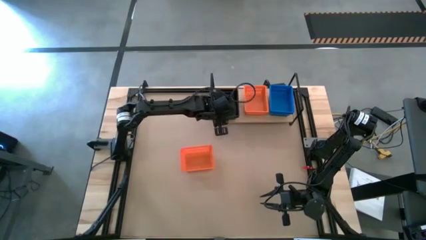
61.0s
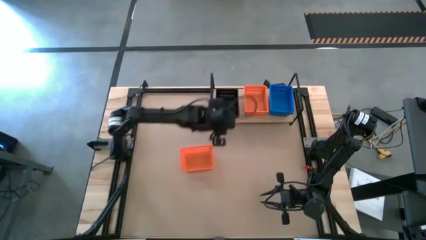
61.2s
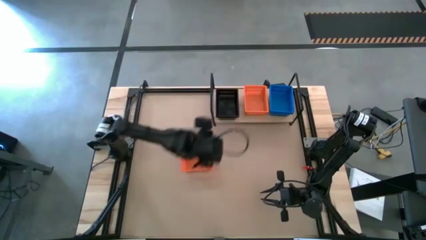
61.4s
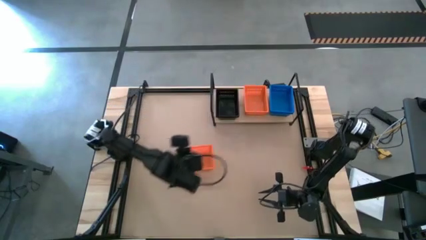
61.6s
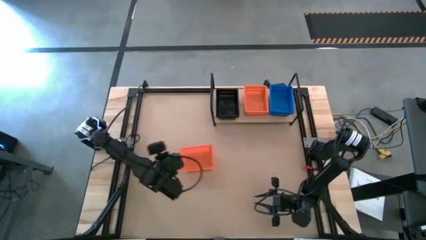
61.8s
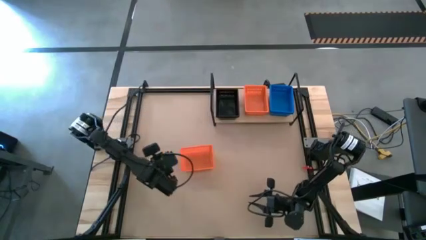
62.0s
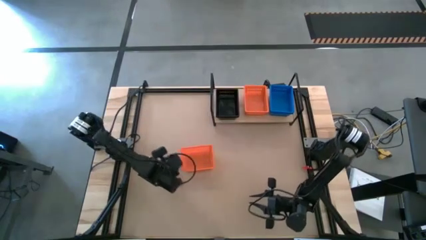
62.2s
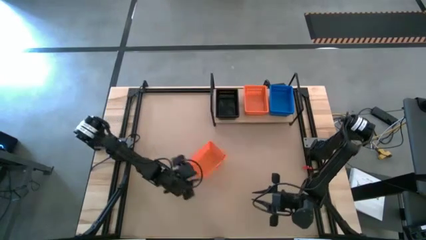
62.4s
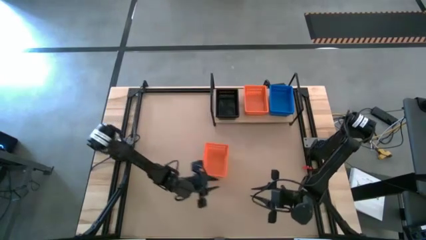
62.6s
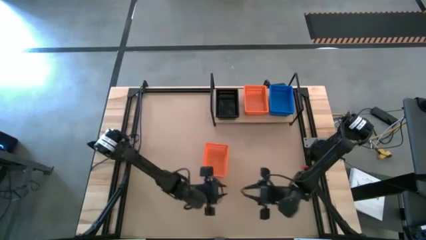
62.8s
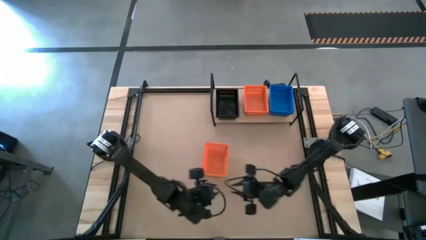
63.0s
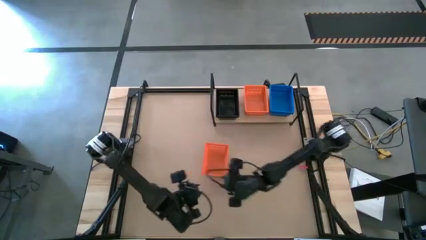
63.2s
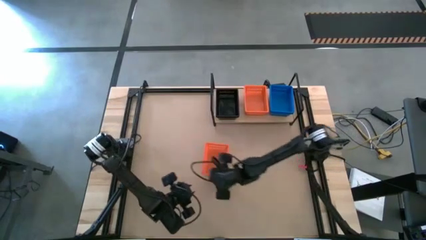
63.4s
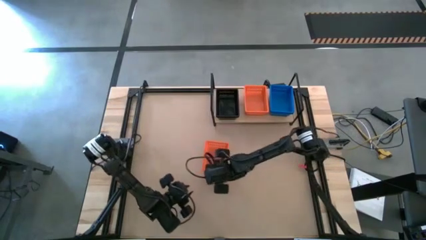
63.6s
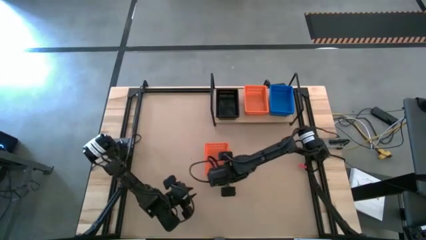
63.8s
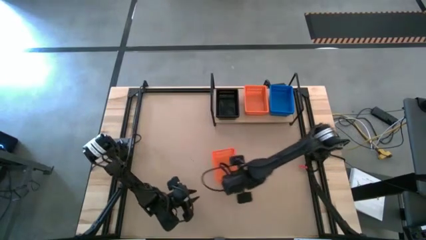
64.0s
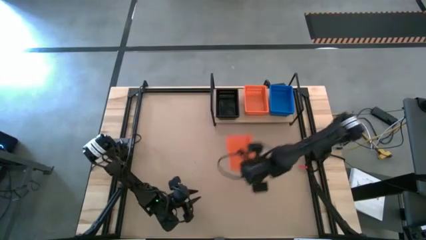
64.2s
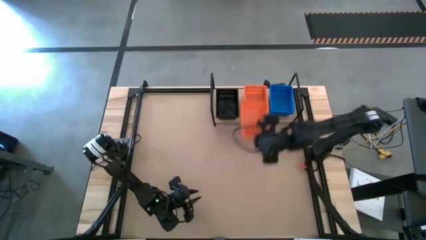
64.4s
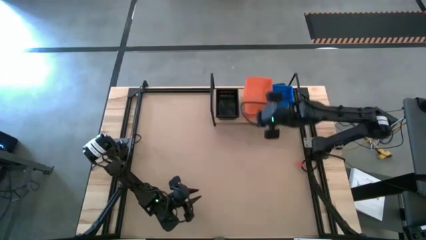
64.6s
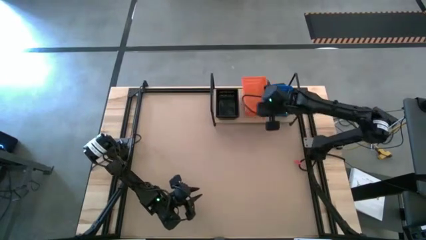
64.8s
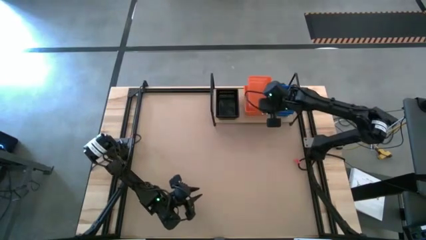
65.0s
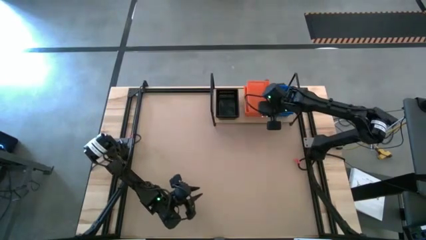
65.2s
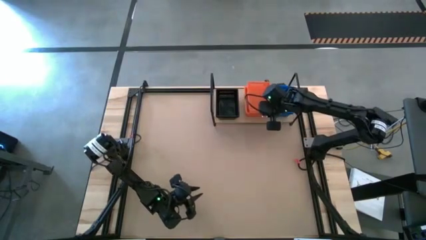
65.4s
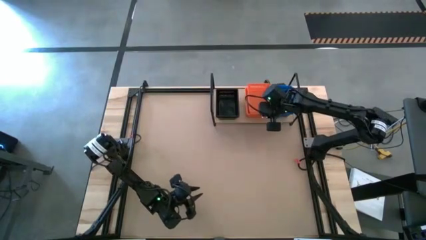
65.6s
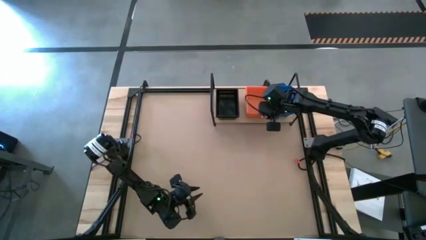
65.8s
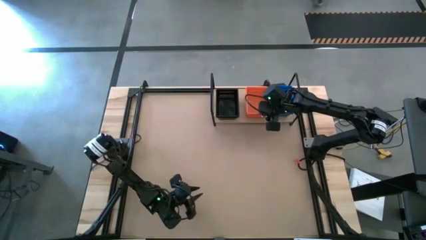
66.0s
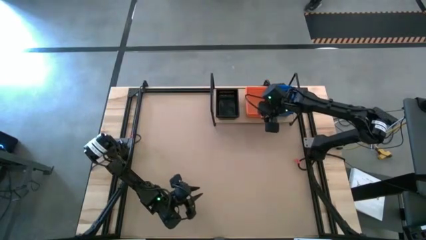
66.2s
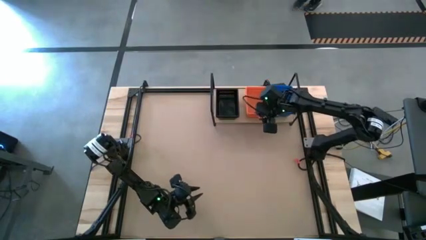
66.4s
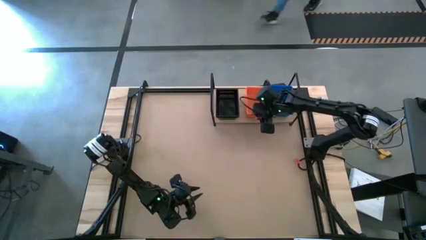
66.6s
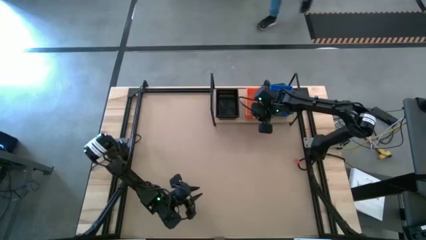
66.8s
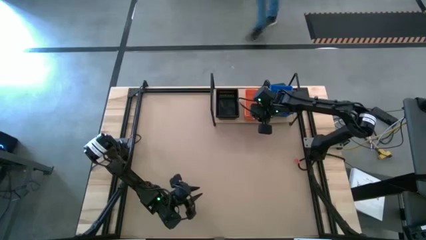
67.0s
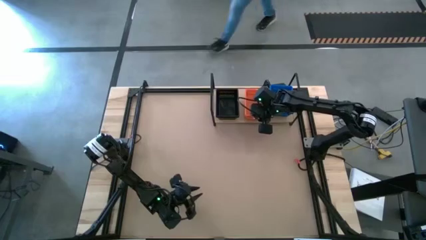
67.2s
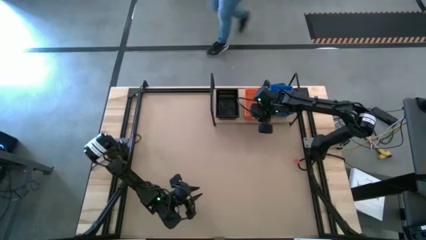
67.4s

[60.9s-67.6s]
Task: Stack baskets on shelf by color
Stack the orange bin on the orange bins on the shelf

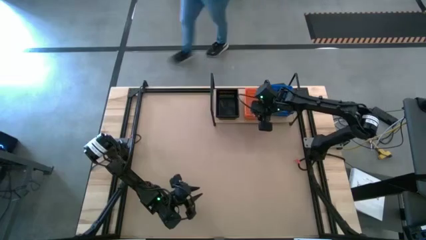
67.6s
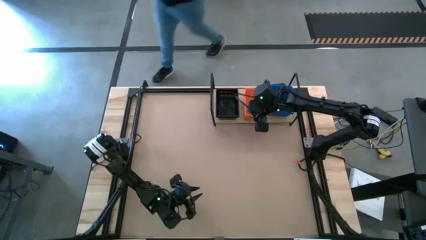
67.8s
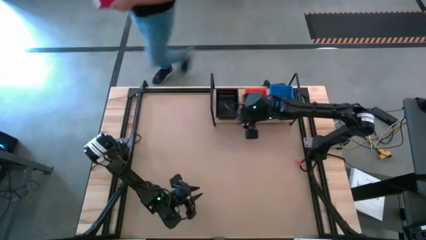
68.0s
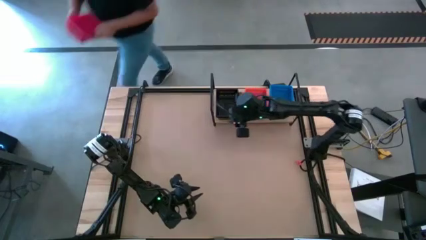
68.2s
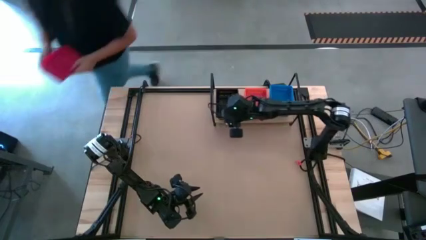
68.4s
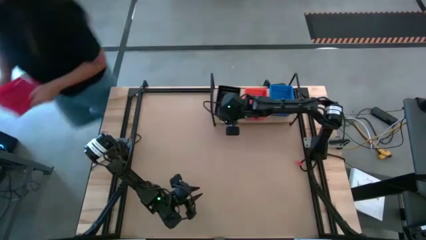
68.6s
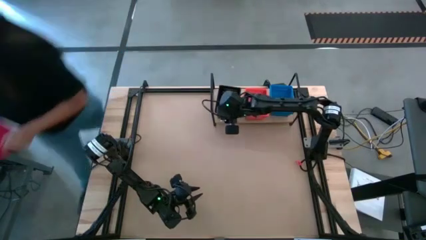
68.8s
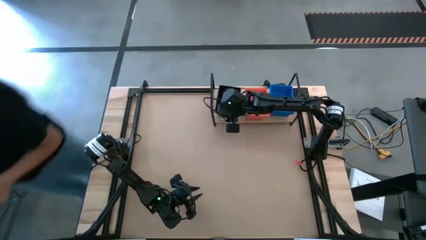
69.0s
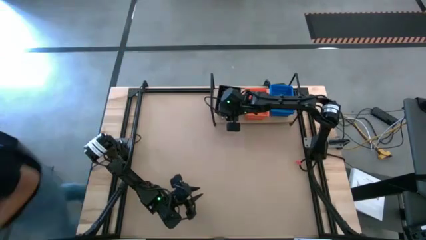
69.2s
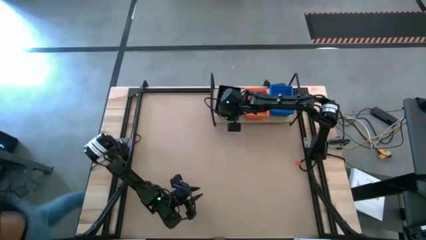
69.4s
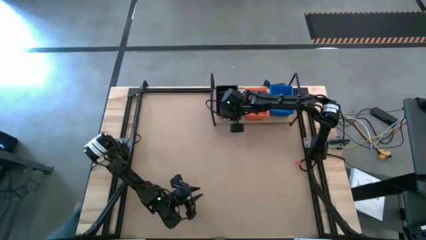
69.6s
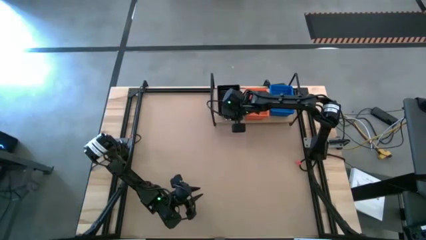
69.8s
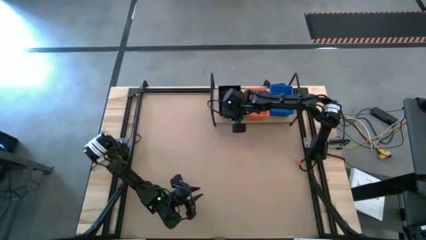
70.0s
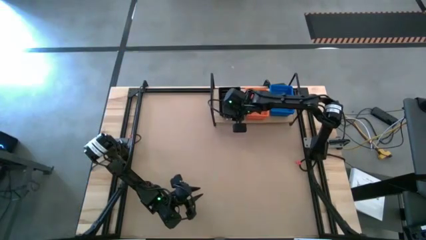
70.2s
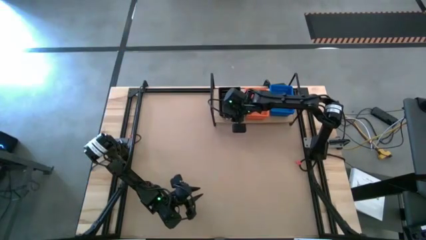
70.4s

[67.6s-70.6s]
Adjust the stacked black bins on the shelf

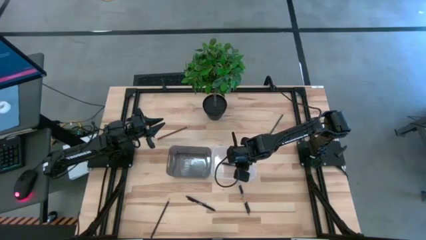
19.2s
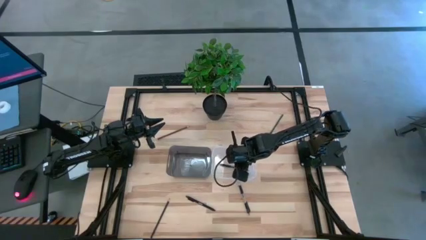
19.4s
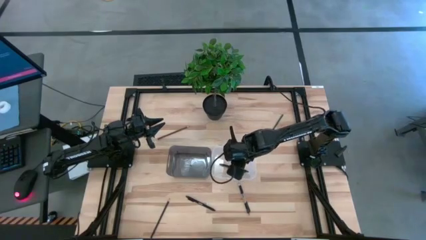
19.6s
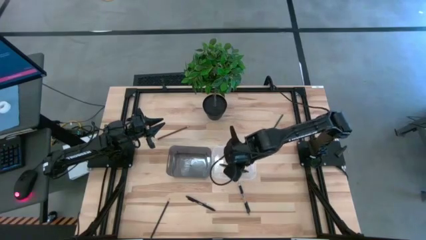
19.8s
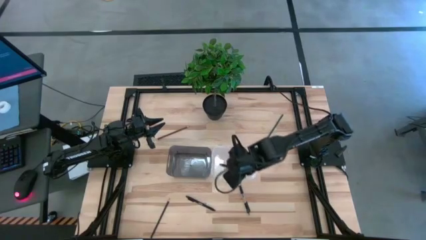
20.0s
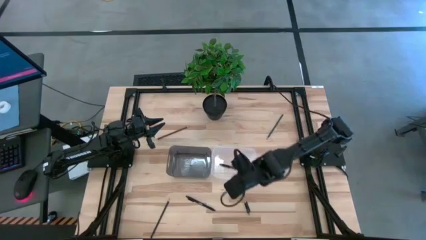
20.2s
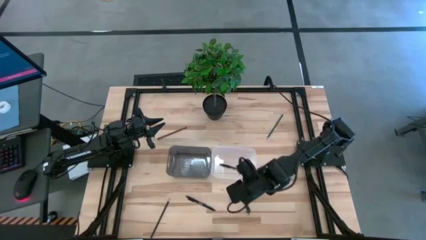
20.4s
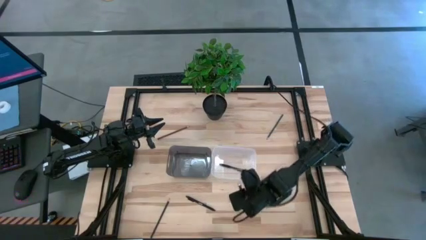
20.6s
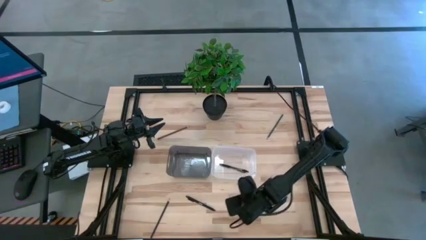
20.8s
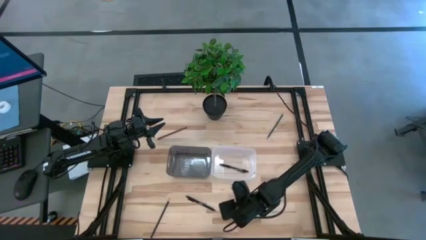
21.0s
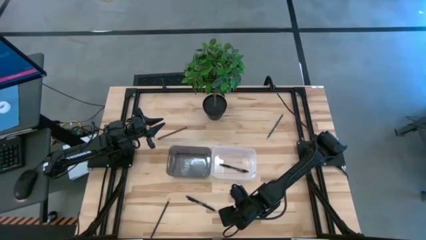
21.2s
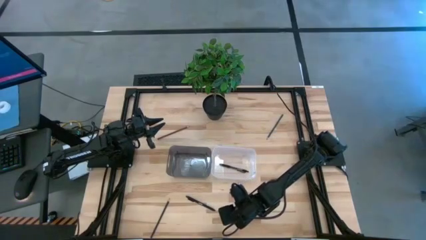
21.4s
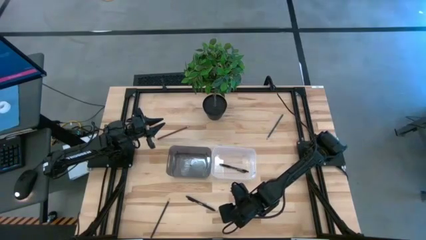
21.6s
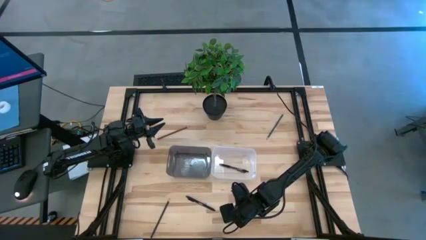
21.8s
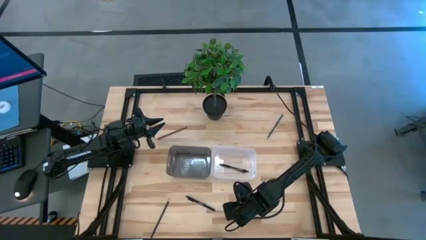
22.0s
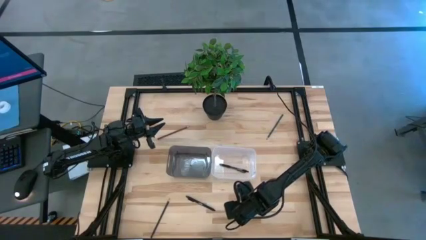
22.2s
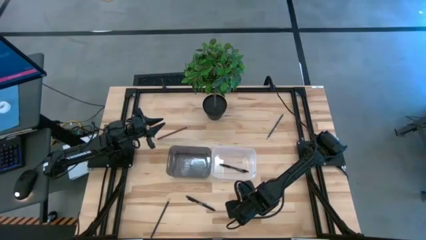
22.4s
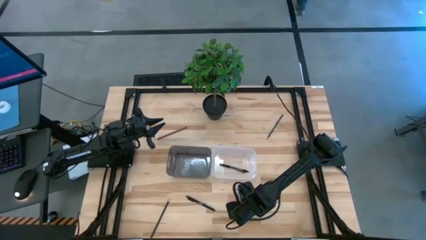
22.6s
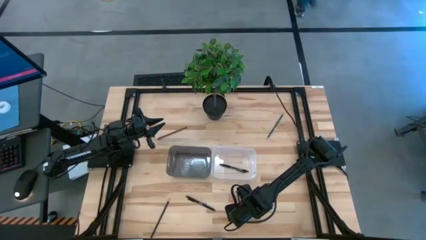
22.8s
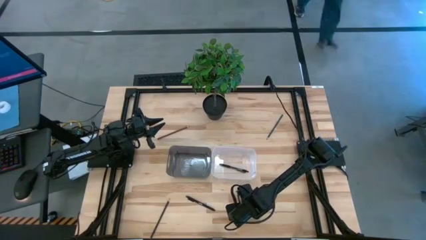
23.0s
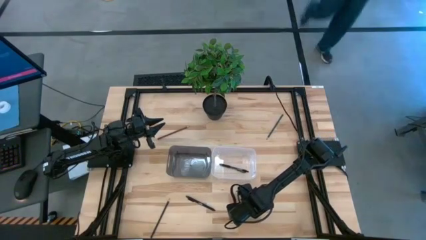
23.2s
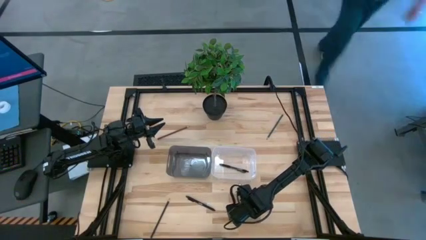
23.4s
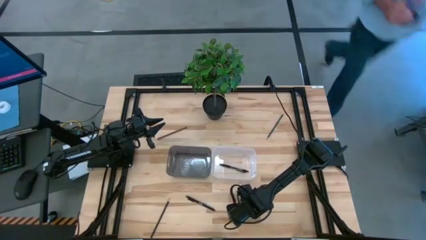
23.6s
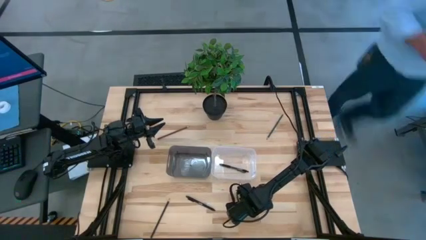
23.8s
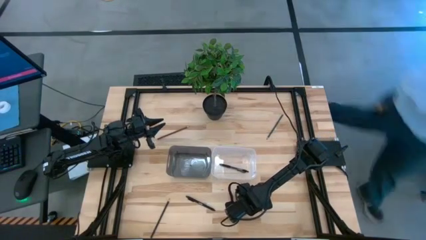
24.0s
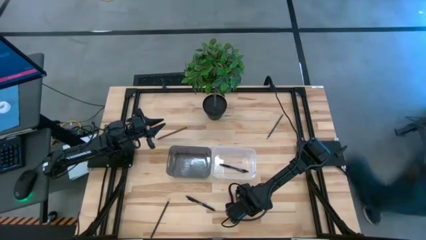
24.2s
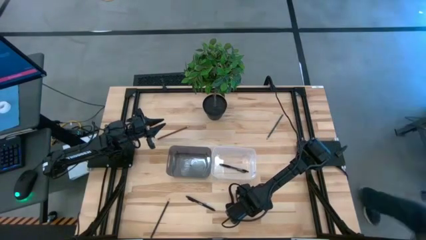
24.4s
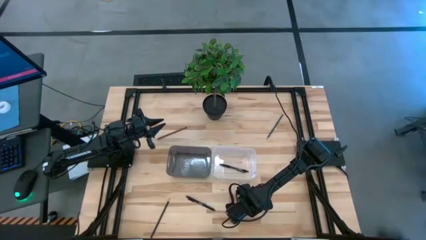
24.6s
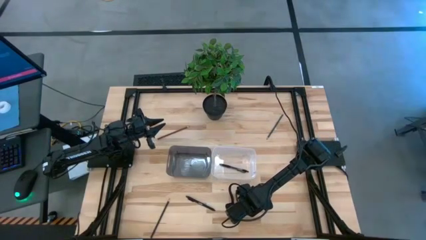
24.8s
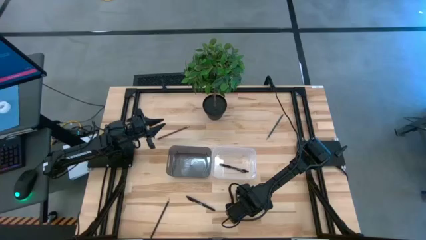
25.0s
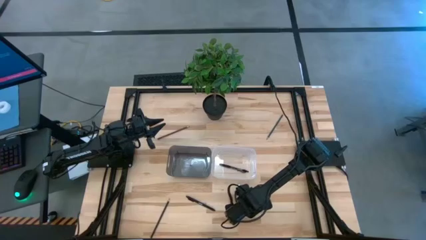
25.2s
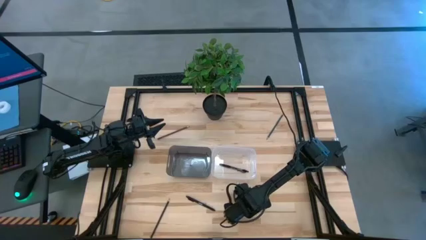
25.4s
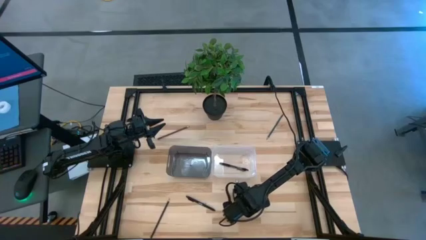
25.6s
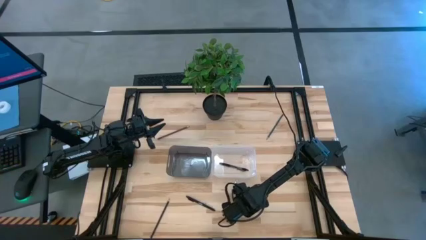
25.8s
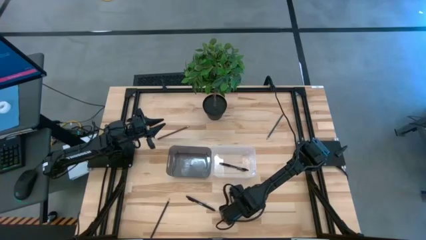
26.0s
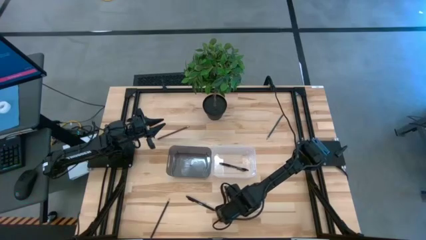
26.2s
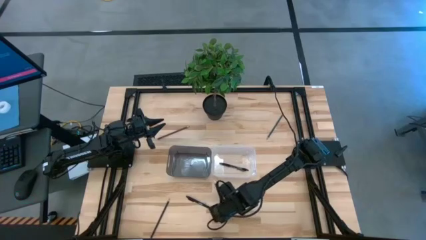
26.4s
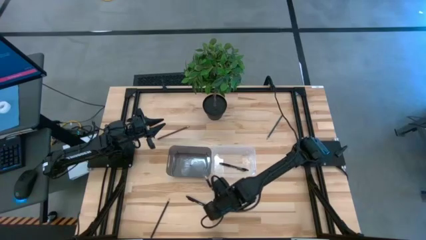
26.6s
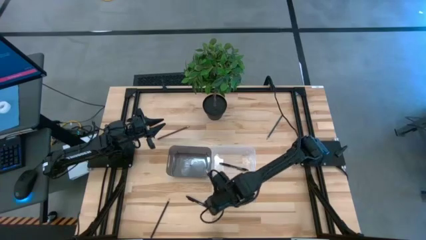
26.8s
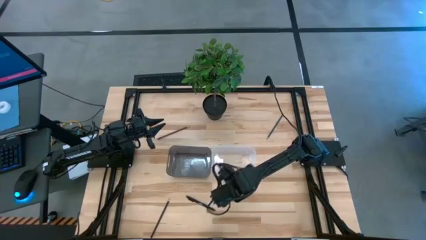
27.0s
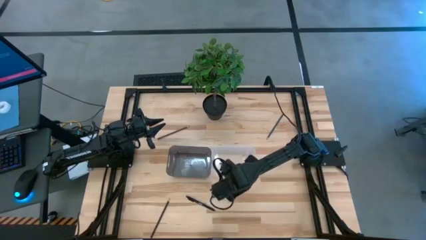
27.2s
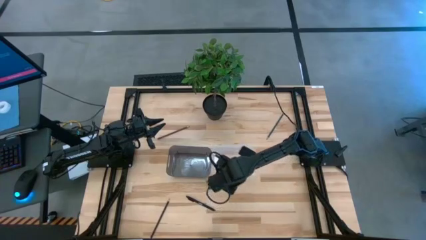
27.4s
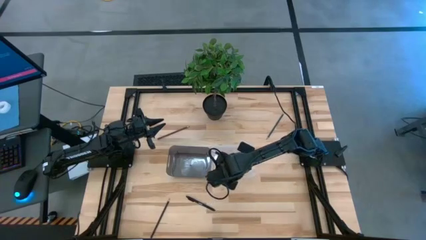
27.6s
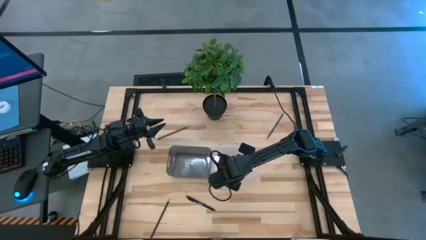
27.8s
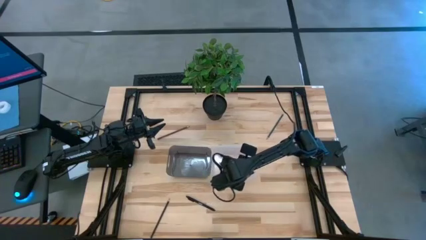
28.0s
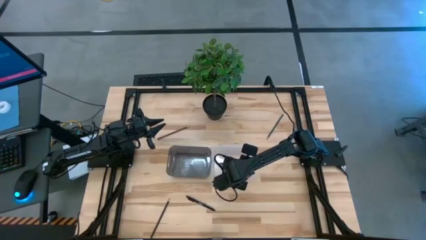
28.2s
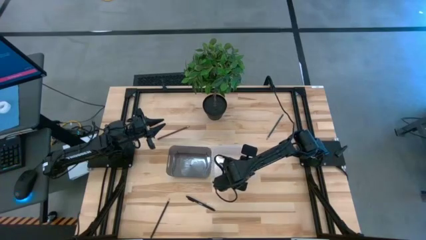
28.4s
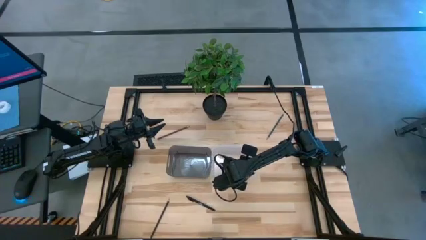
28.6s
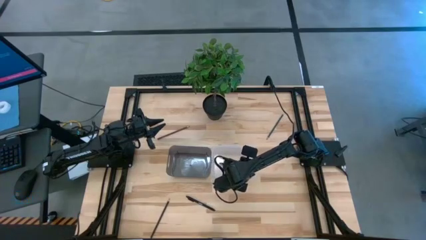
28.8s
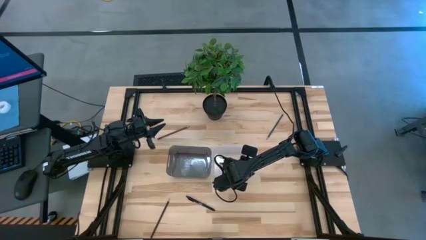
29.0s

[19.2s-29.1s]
Task: Sort pens & pencils
Put the right black pen into the transparent bin
